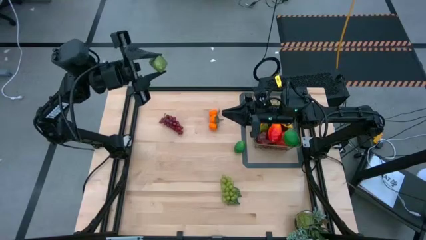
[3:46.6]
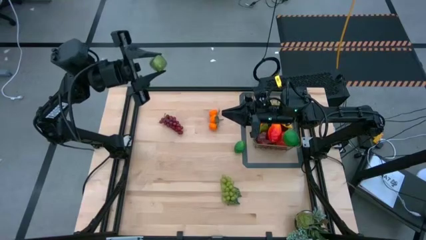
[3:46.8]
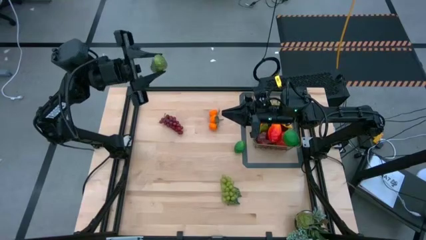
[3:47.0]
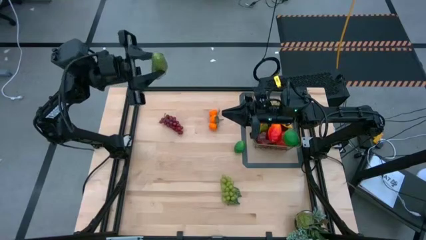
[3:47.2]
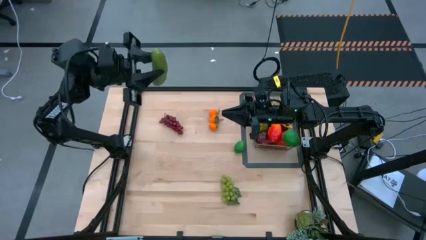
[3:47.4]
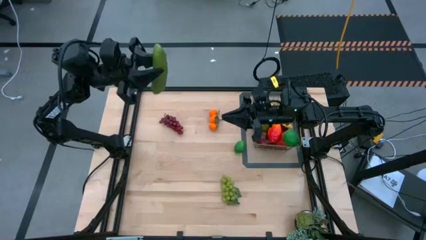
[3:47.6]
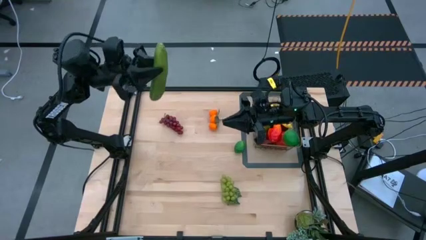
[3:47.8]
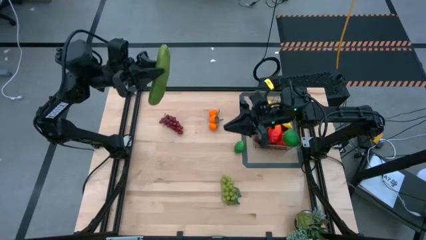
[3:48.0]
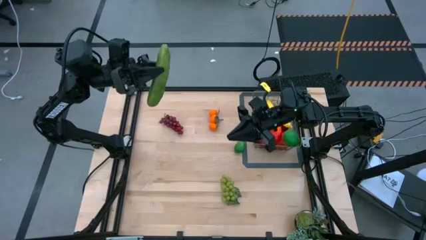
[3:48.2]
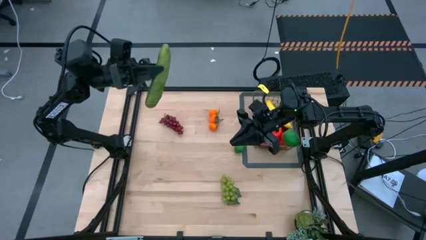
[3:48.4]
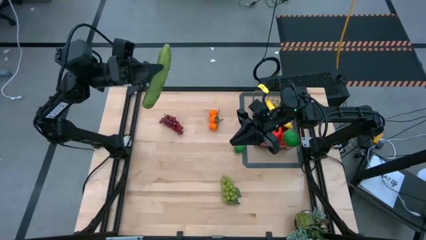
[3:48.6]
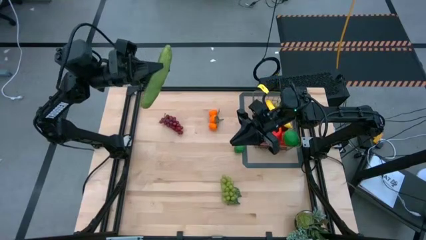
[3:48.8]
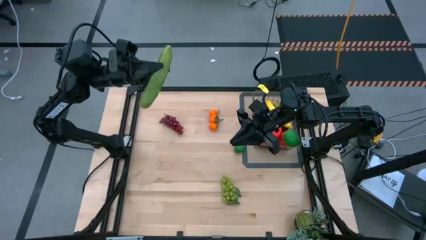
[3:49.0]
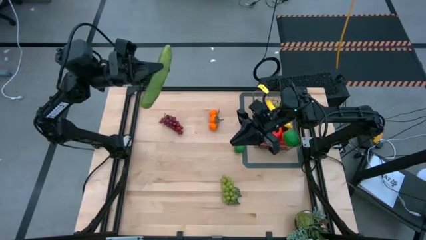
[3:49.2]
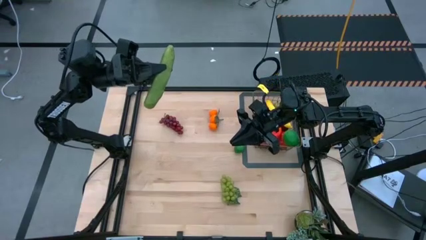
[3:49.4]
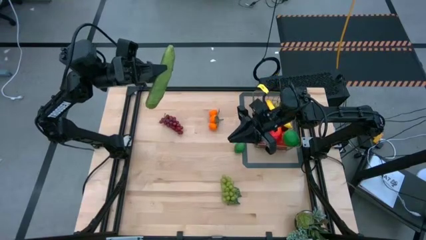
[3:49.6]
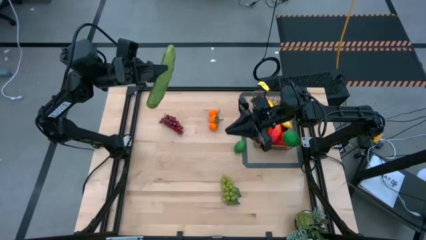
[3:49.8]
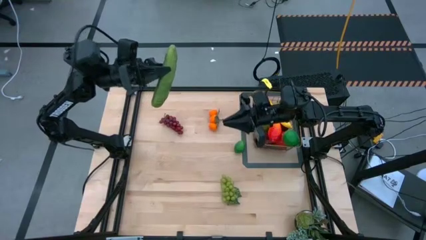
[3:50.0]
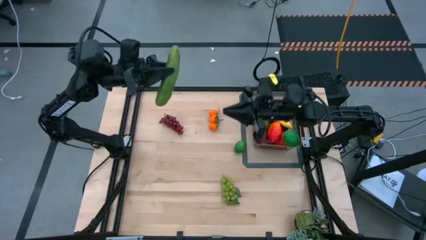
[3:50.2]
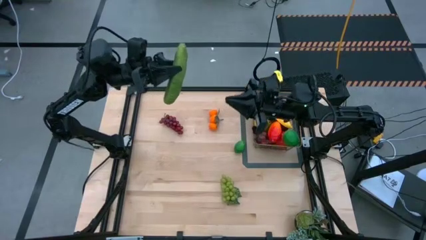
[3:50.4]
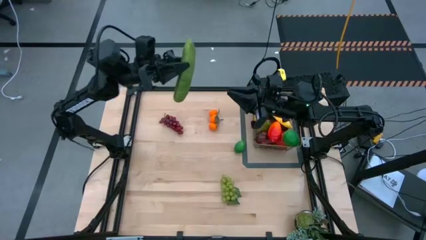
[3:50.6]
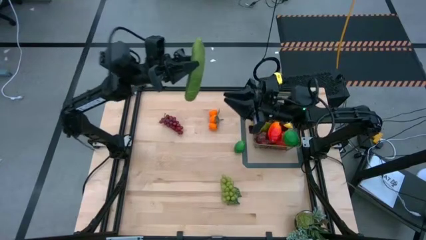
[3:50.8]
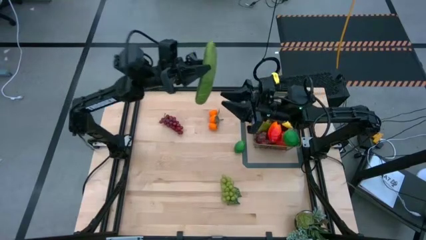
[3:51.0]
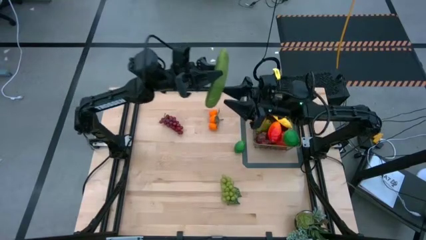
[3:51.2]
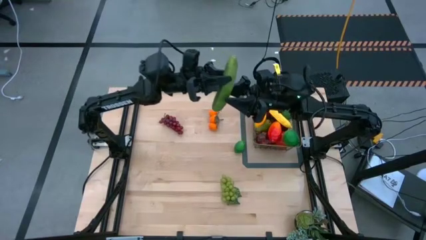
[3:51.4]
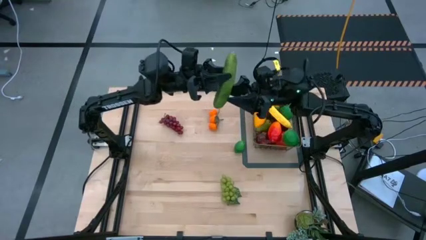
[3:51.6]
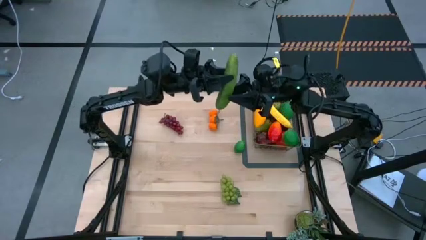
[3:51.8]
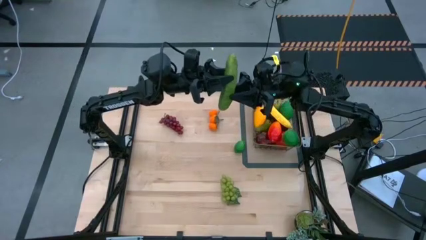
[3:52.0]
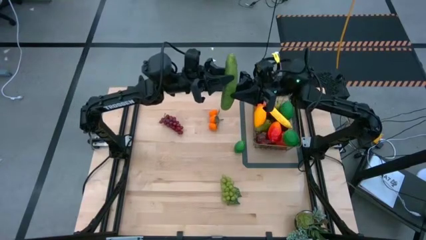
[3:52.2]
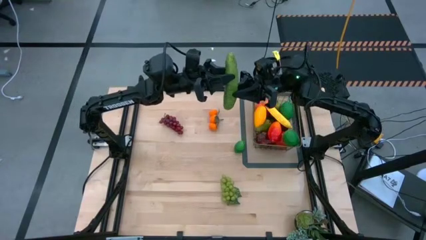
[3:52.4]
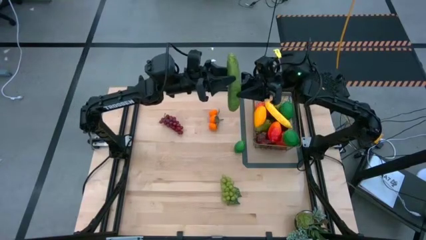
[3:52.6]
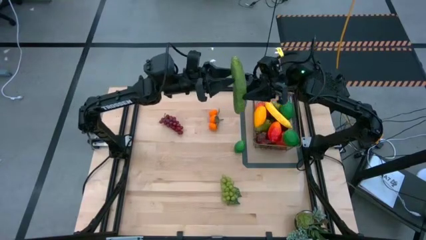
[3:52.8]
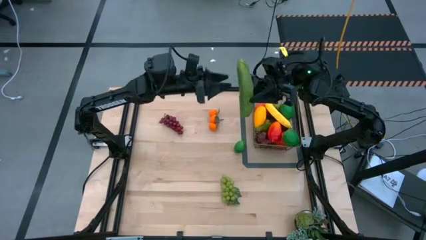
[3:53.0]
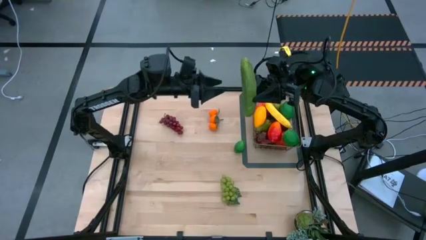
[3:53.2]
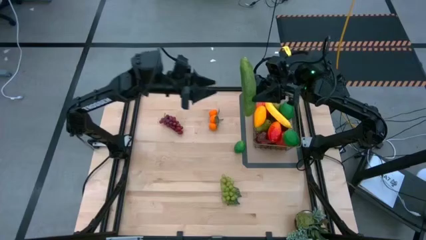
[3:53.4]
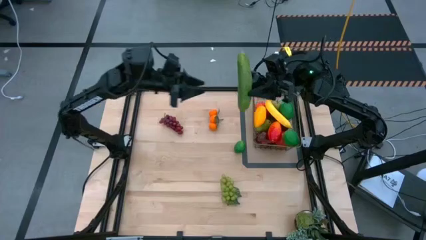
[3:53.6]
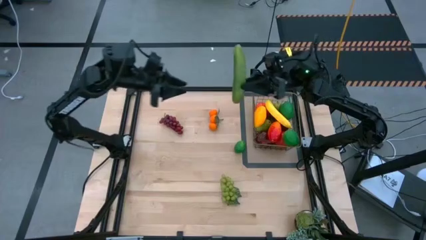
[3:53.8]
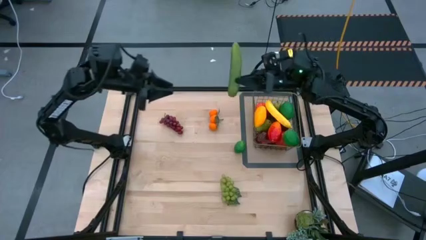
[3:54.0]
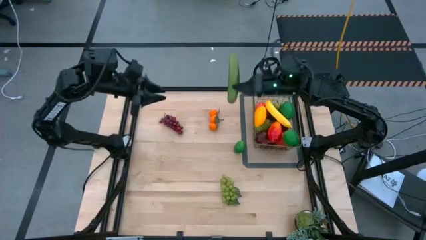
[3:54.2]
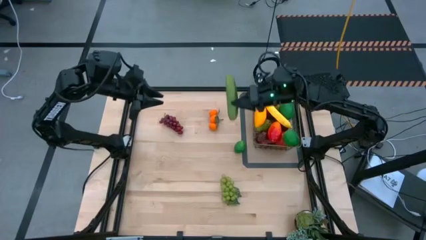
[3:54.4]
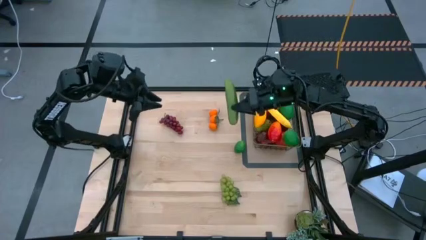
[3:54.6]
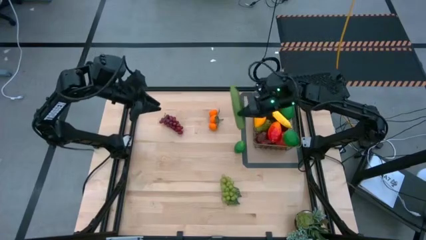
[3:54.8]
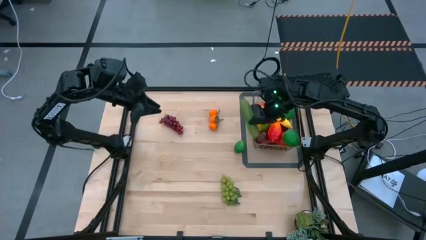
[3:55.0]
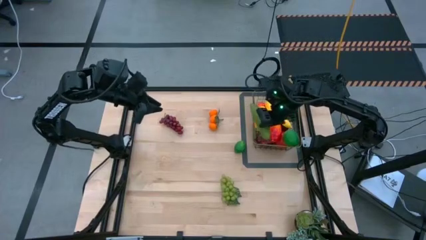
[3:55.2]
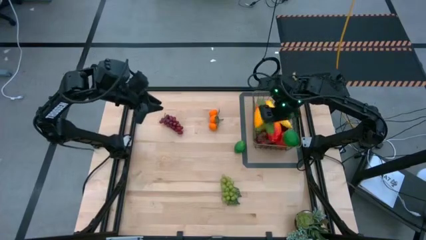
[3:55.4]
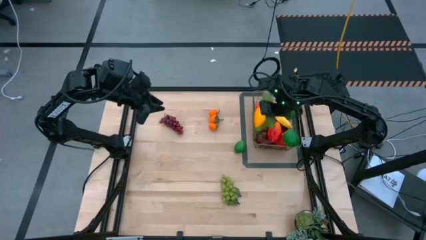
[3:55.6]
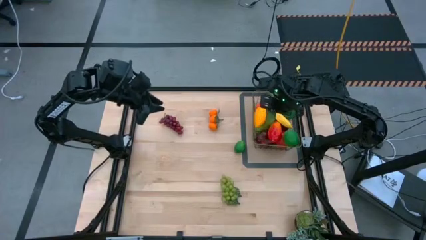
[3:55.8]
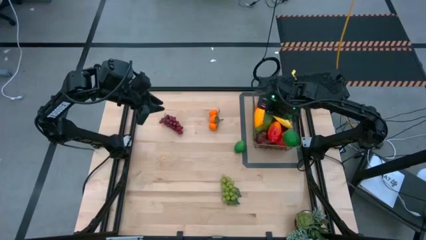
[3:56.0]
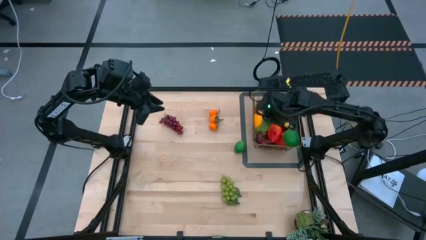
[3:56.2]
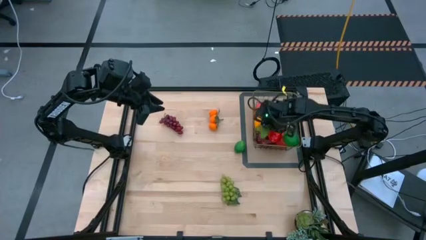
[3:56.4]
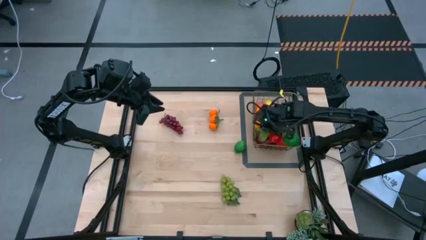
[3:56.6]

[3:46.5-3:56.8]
Task: Build produce basket
Put the green cucumber into the wire basket

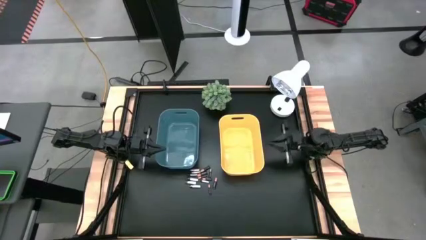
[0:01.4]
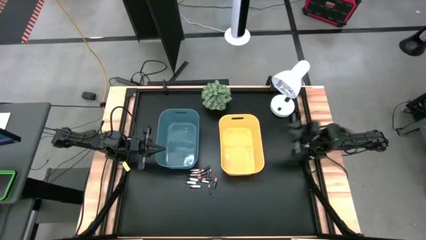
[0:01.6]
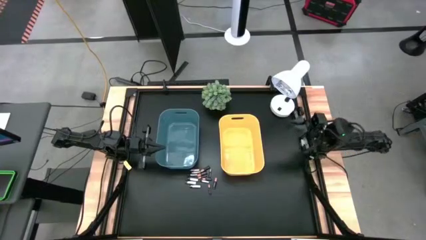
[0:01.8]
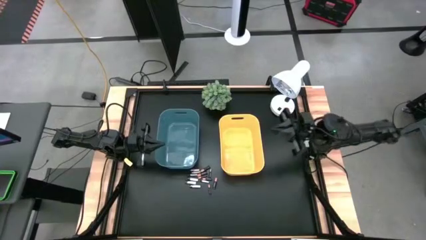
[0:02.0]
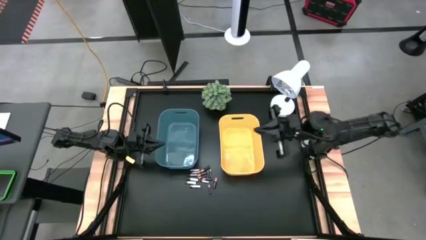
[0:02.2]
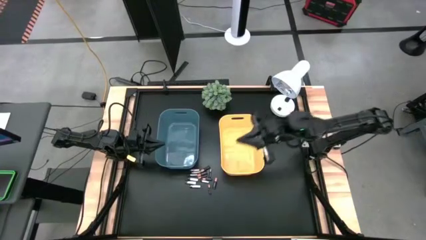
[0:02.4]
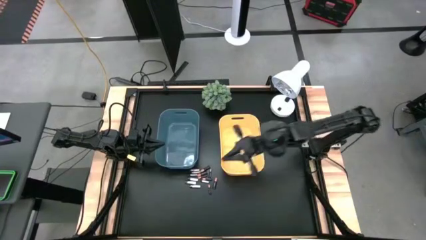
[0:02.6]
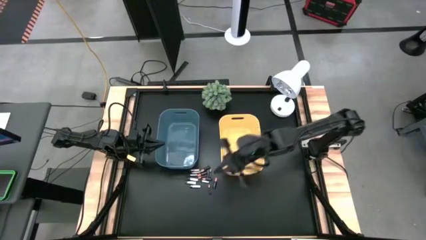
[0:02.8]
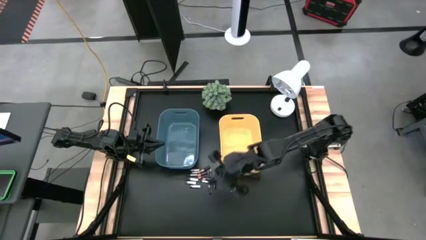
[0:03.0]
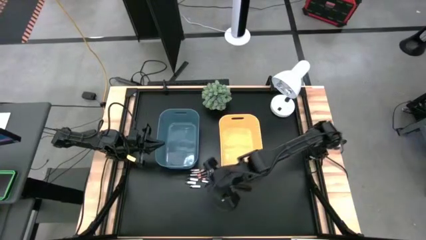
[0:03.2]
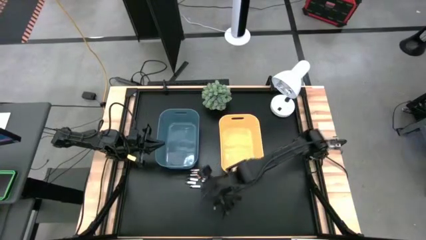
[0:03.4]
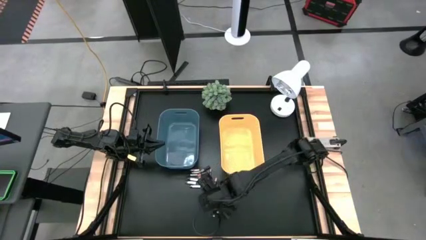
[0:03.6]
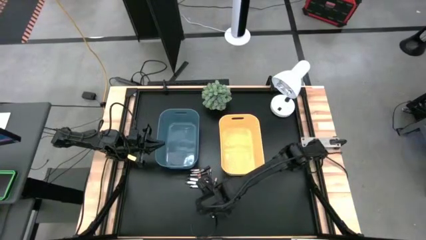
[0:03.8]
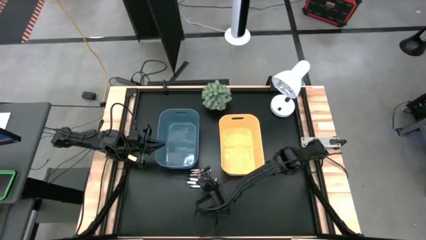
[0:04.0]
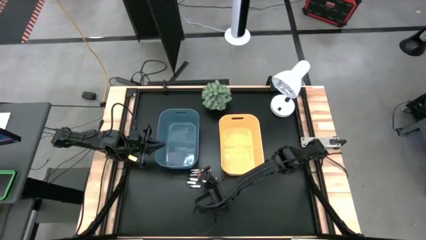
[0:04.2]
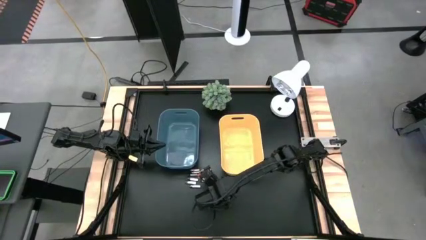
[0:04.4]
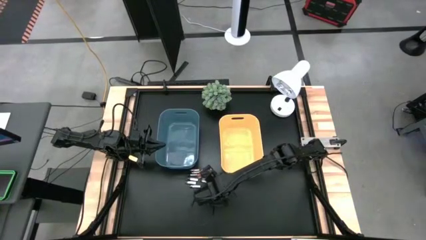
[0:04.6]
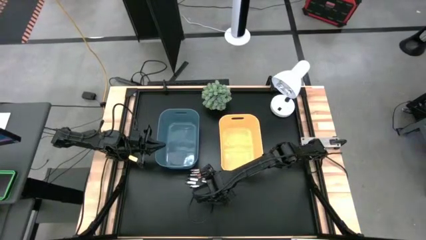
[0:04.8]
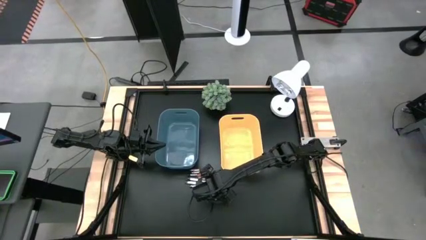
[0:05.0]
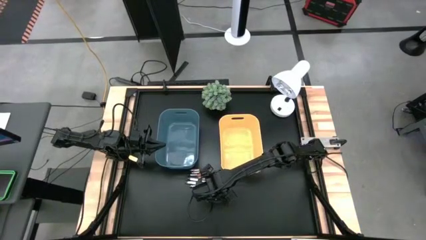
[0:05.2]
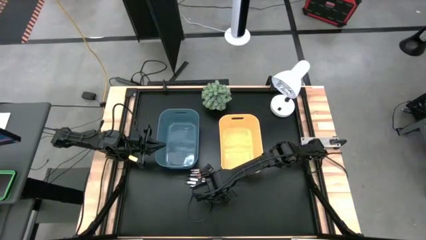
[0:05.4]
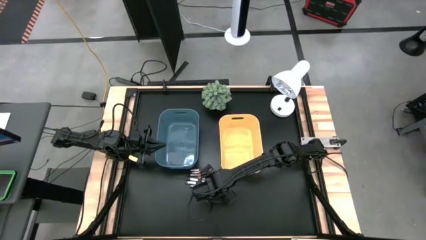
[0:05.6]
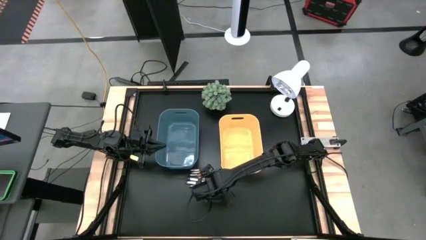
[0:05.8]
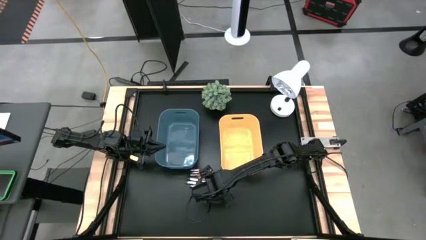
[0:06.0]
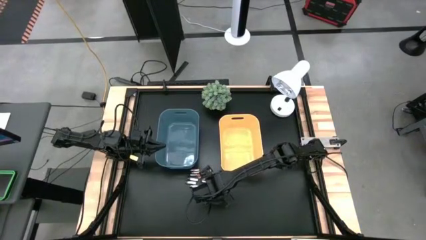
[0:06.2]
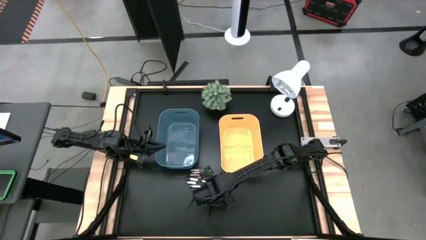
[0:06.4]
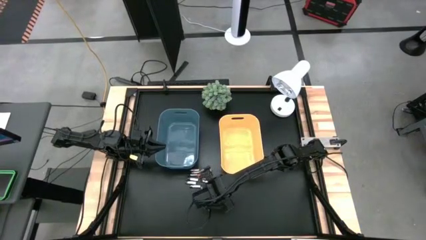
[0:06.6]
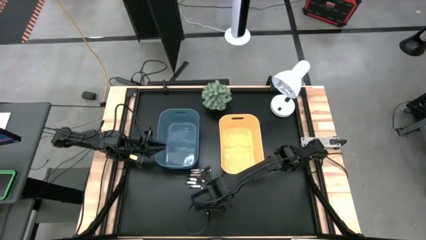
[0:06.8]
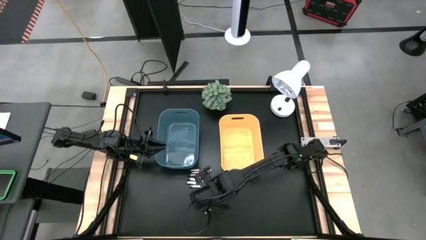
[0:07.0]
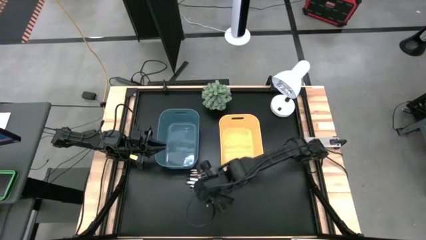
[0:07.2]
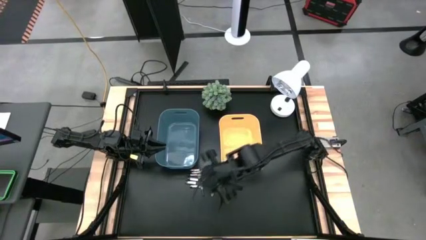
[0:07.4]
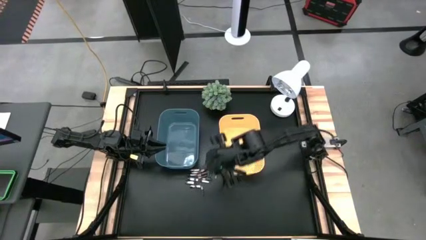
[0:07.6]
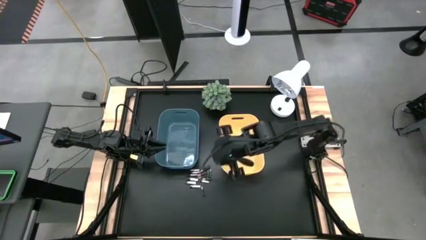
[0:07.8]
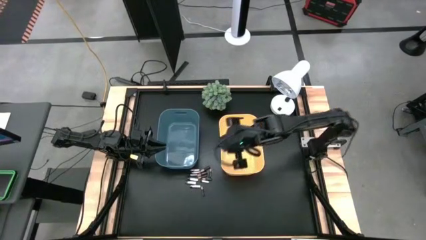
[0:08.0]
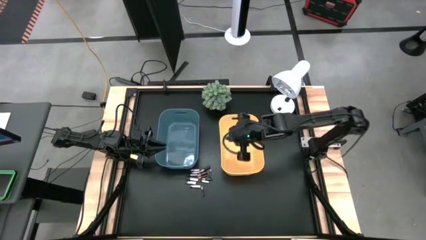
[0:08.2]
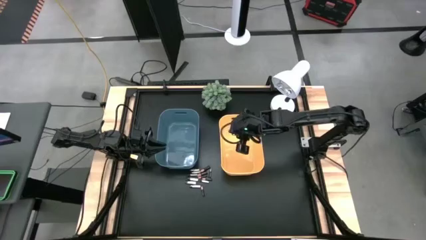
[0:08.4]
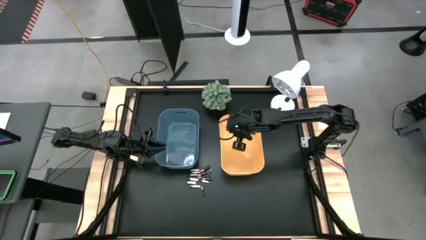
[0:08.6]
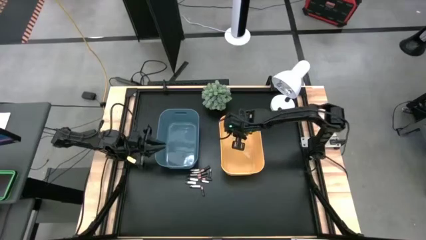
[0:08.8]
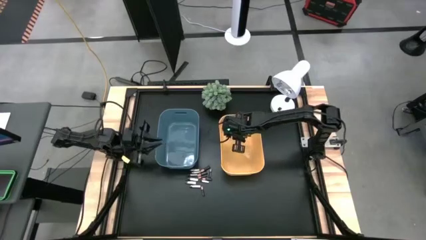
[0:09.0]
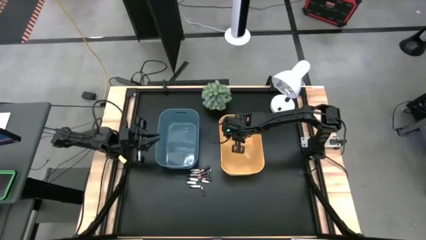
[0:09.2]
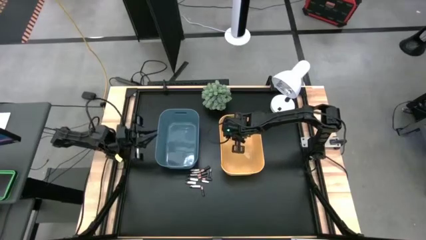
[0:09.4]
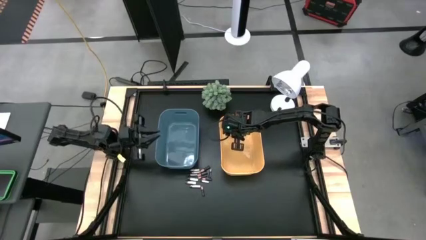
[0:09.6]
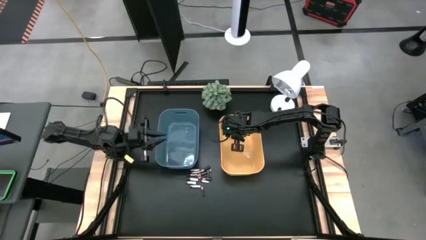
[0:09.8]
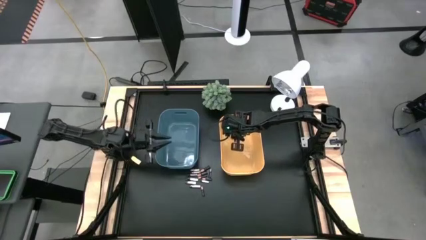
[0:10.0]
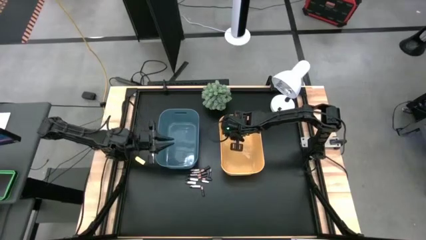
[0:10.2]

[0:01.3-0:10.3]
Task: Sort batteries
Put the black battery into the yellow bin
